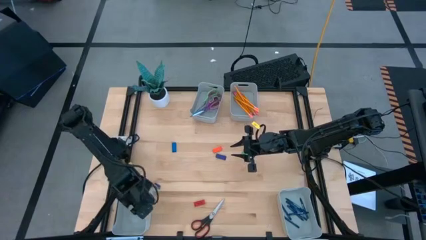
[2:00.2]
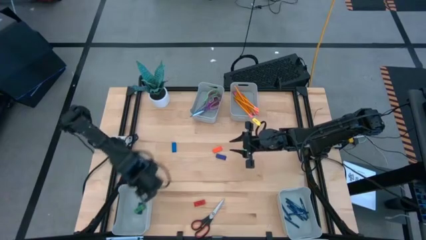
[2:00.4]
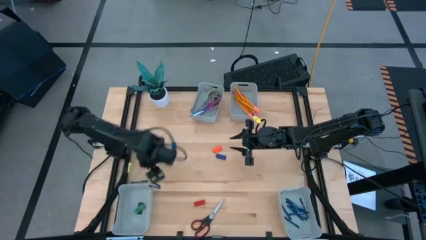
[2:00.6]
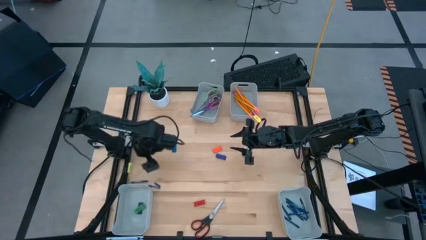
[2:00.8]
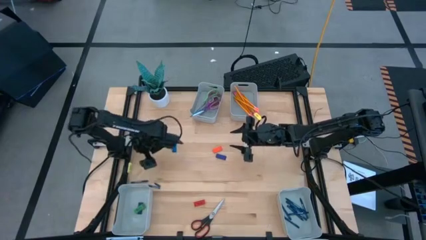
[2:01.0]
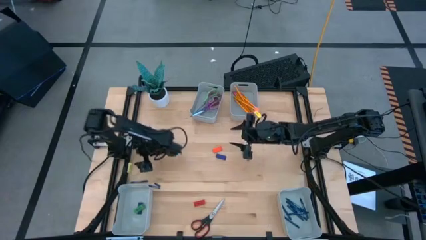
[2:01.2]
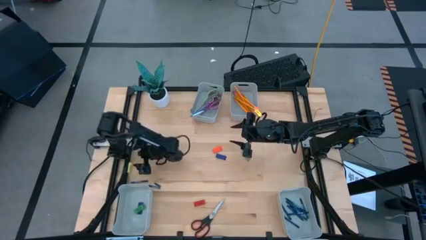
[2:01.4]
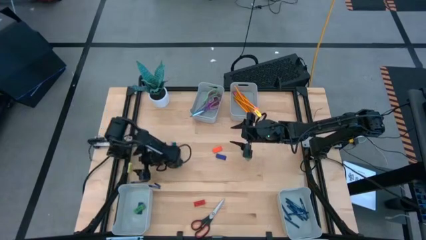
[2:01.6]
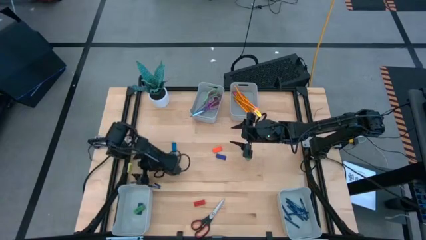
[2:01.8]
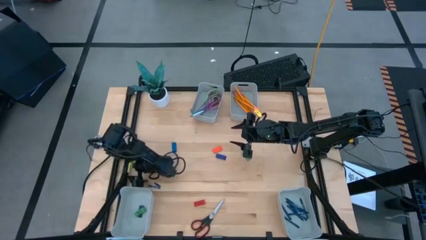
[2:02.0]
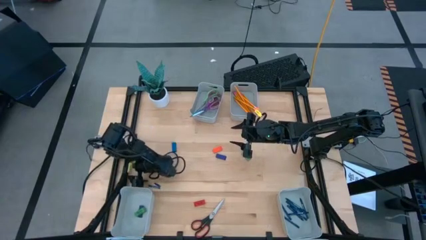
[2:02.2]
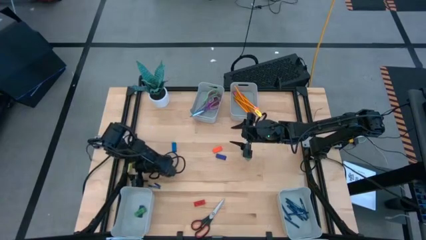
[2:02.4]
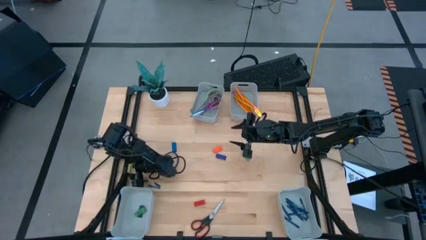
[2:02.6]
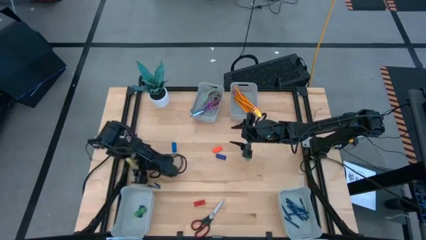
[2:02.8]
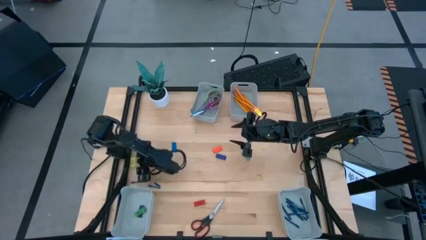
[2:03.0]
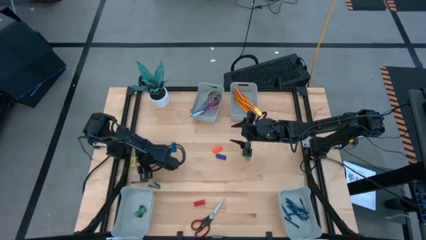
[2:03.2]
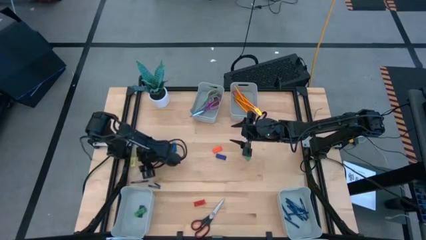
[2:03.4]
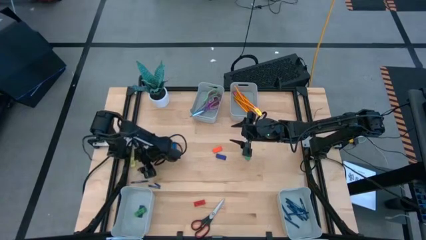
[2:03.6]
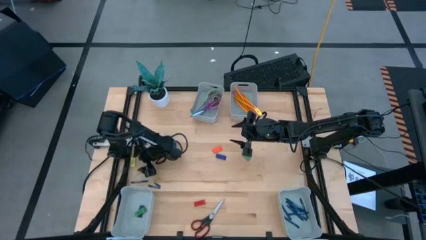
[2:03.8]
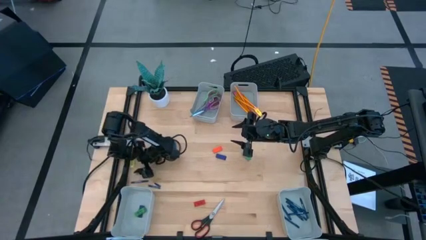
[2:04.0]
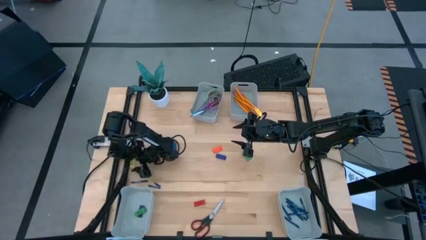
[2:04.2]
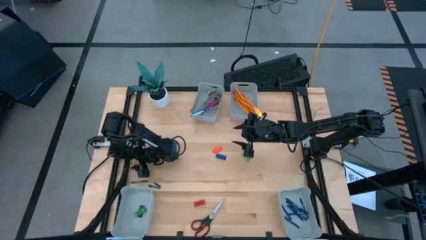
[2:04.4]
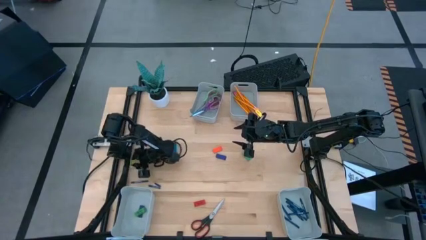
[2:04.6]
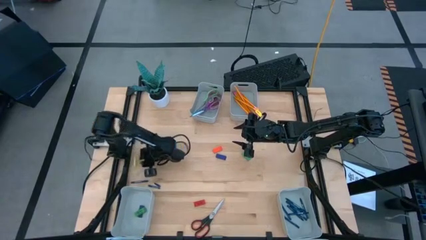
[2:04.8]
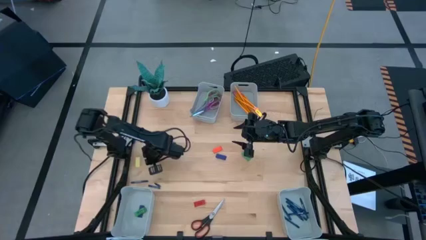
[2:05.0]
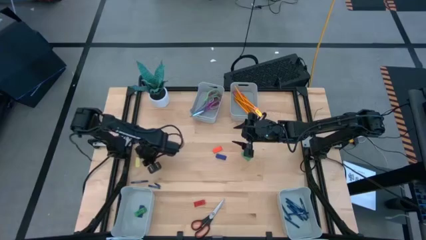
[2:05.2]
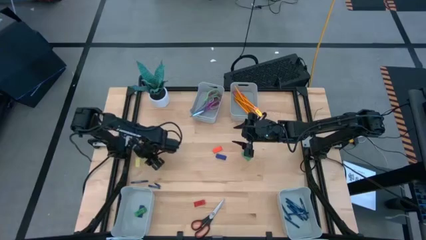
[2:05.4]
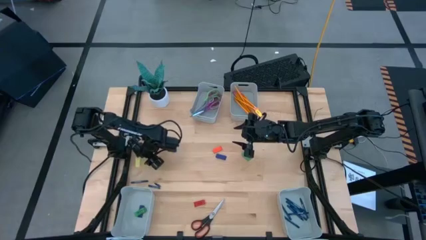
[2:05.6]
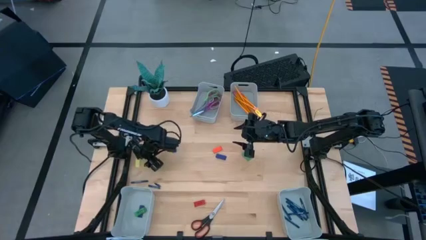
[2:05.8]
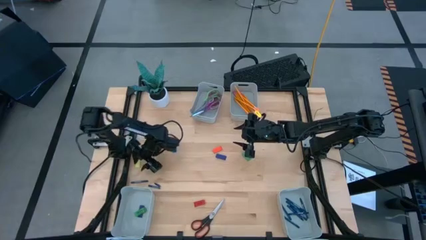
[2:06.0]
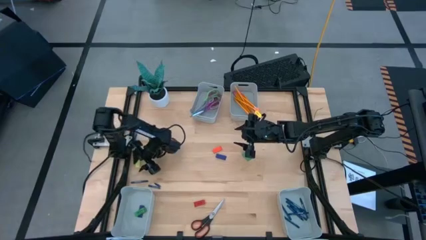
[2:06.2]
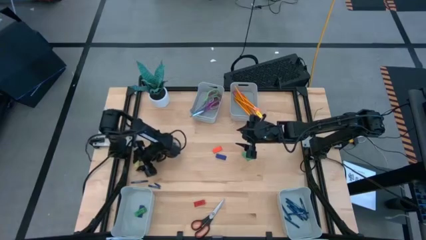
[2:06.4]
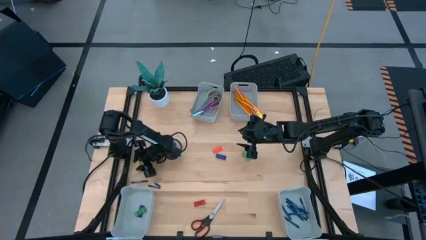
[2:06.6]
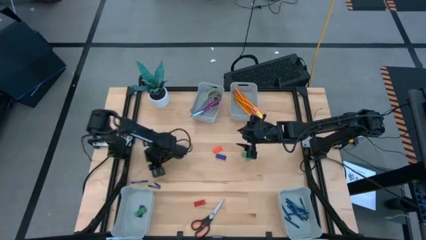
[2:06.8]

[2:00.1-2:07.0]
Task: Sort crayons/erasers/pens/pencils in bins
Prepare the yellow eraser

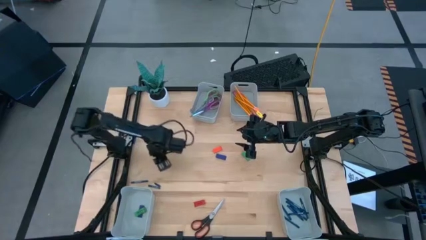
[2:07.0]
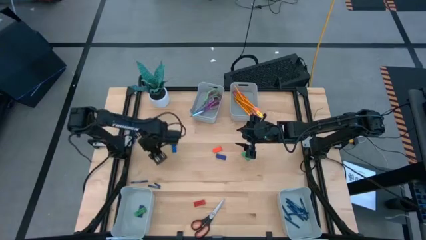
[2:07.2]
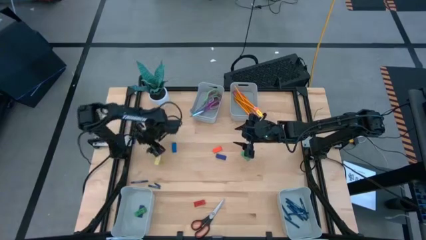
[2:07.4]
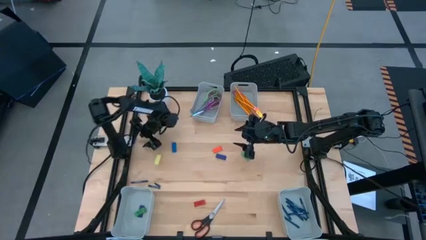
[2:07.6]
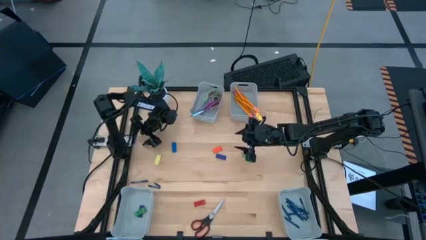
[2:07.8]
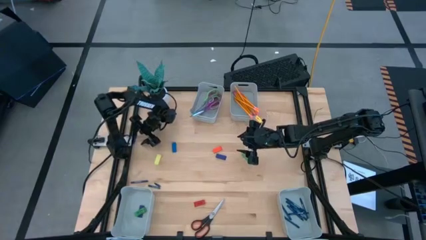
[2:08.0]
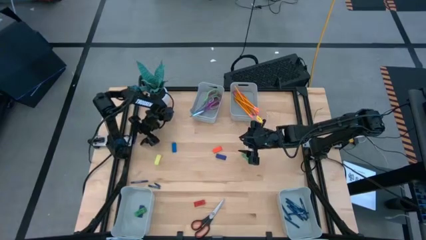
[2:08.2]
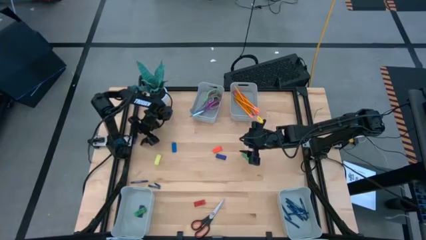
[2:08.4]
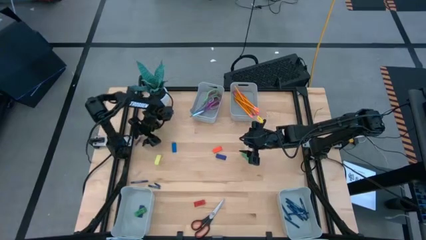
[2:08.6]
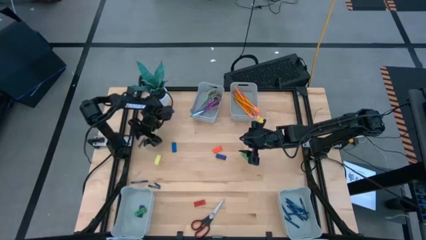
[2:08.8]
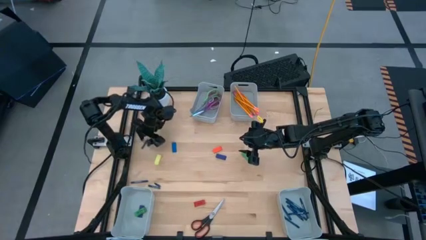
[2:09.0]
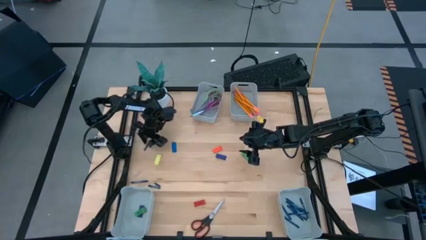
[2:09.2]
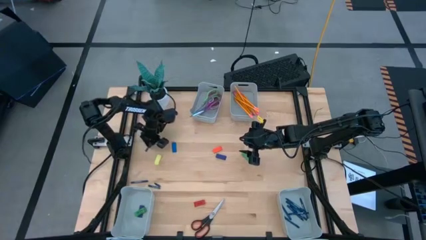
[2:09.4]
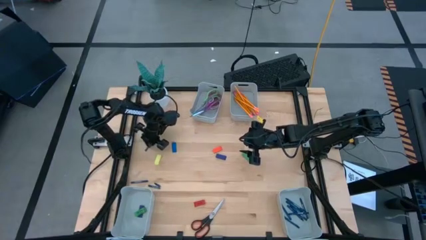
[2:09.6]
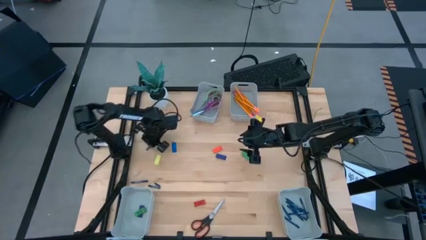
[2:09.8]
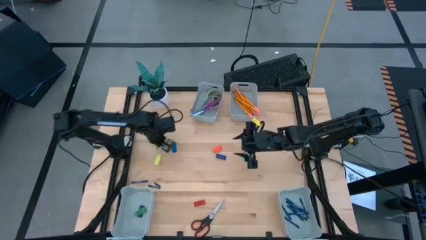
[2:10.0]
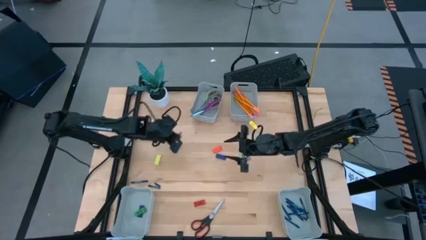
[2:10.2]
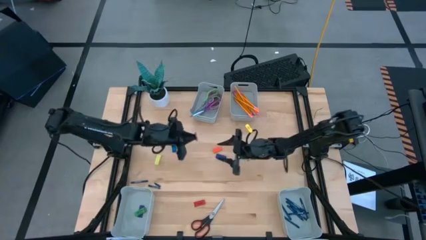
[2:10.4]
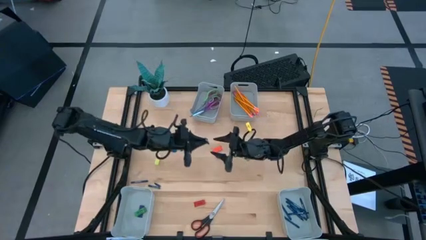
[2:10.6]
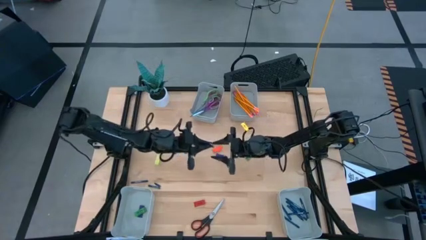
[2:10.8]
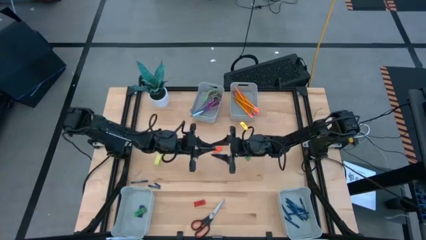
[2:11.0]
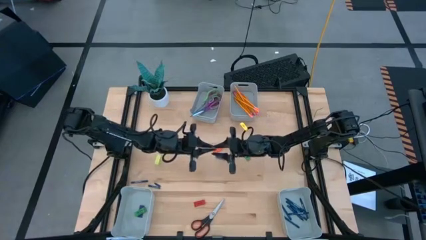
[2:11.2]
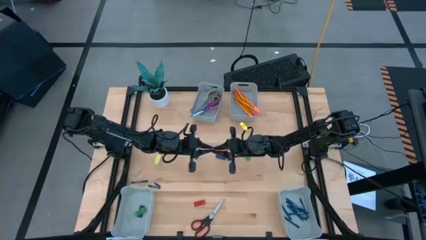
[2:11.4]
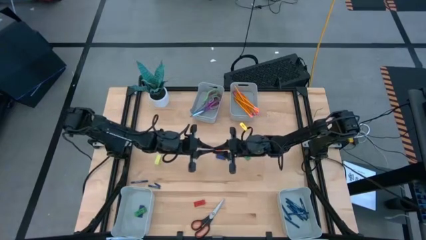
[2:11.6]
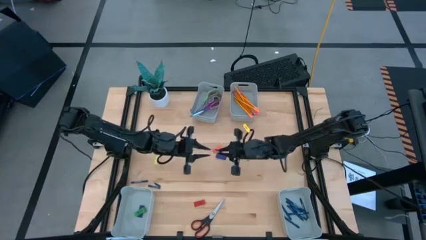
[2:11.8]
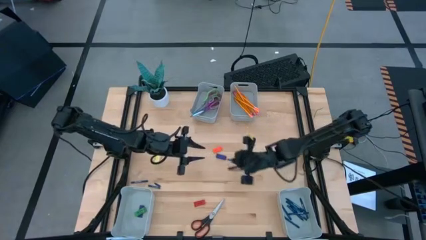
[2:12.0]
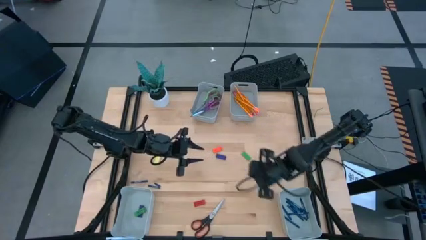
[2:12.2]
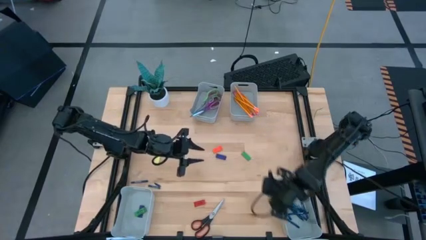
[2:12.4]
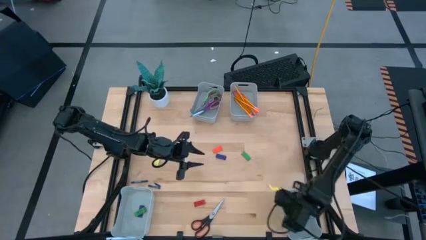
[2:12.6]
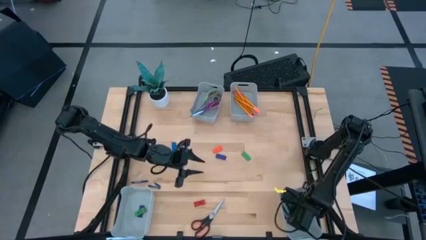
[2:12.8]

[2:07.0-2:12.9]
Put the blue crayon into the bottom right bin

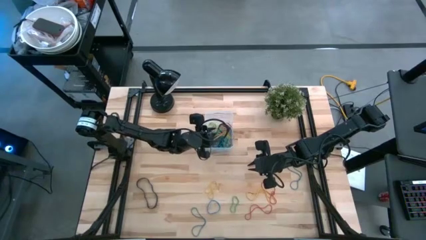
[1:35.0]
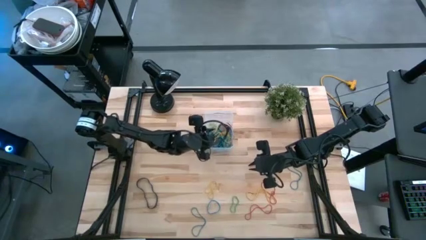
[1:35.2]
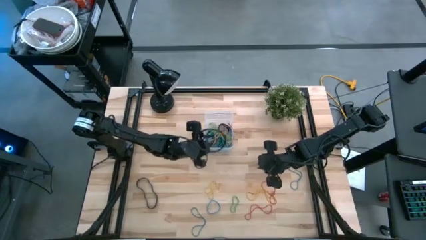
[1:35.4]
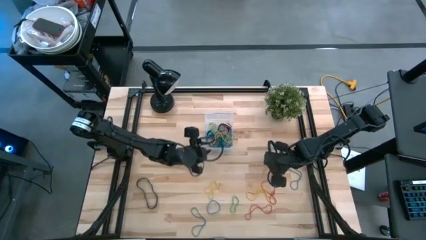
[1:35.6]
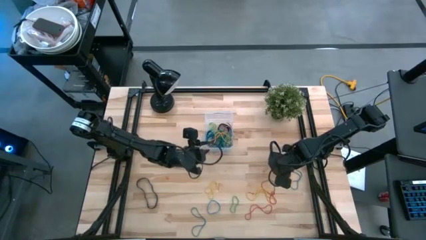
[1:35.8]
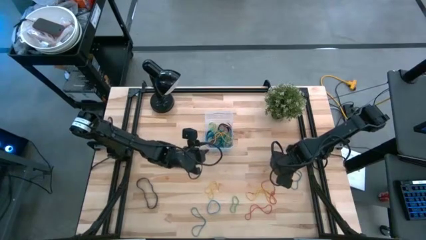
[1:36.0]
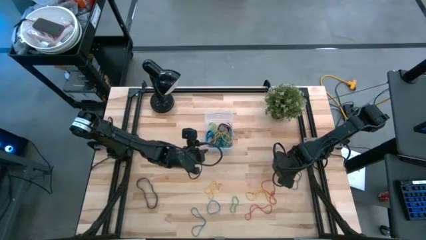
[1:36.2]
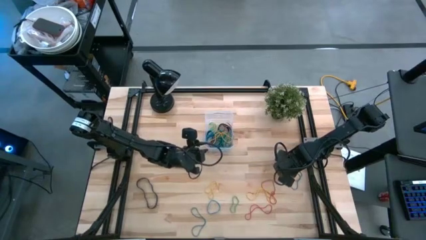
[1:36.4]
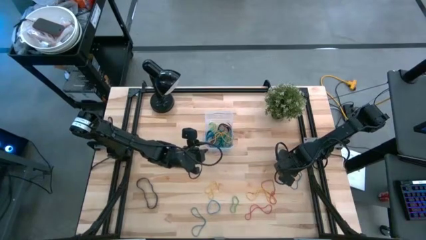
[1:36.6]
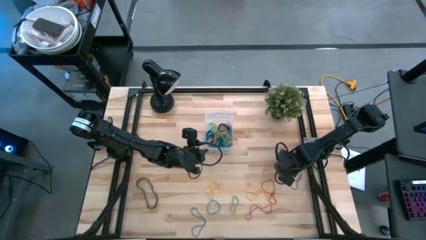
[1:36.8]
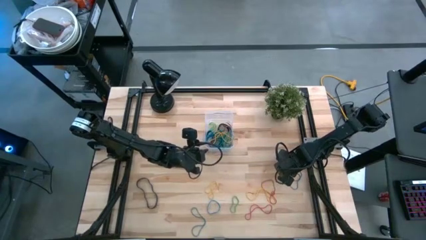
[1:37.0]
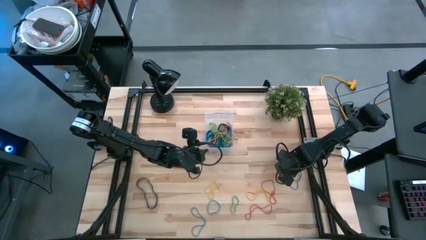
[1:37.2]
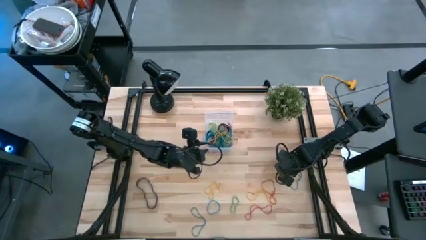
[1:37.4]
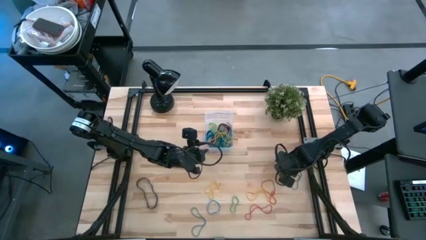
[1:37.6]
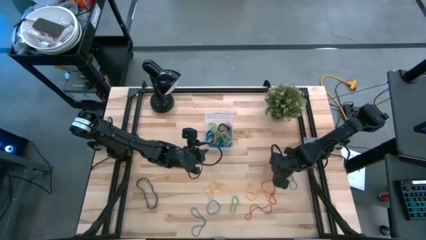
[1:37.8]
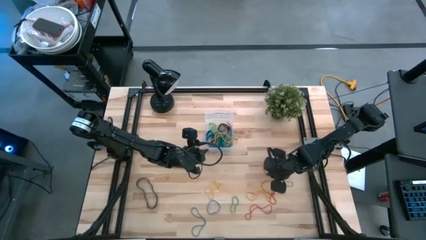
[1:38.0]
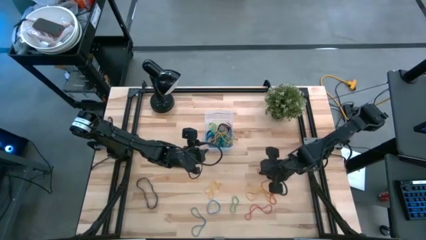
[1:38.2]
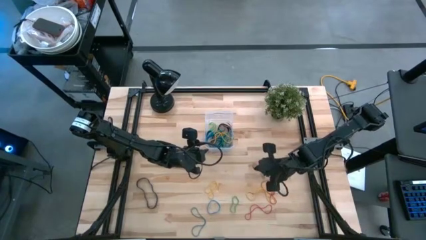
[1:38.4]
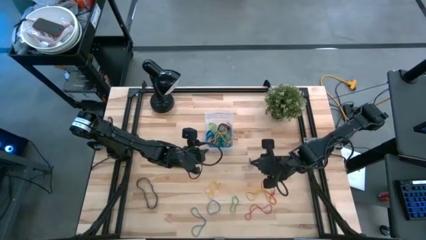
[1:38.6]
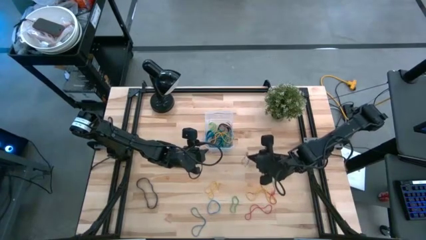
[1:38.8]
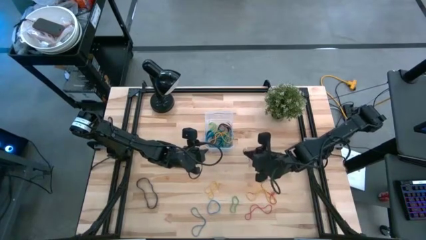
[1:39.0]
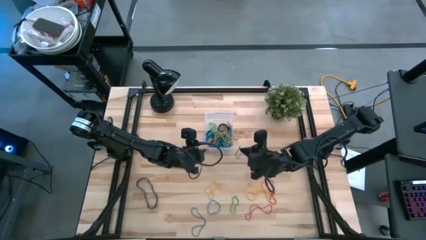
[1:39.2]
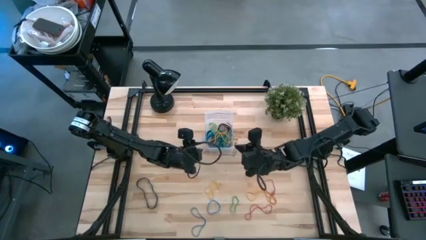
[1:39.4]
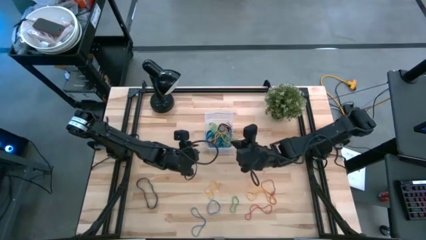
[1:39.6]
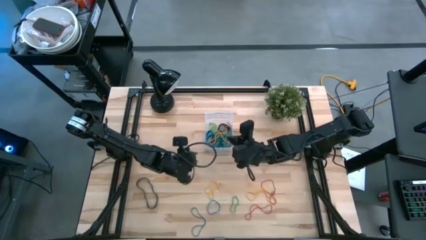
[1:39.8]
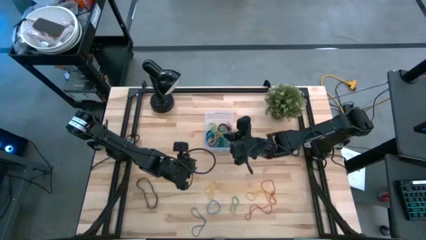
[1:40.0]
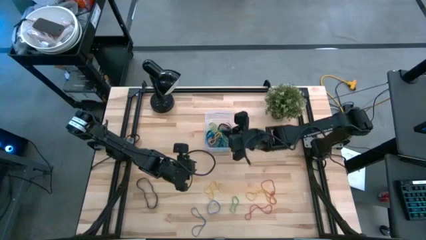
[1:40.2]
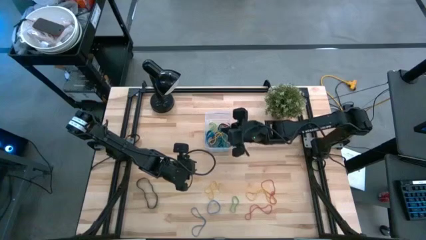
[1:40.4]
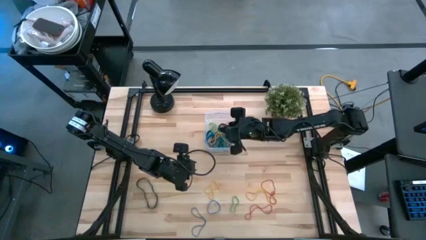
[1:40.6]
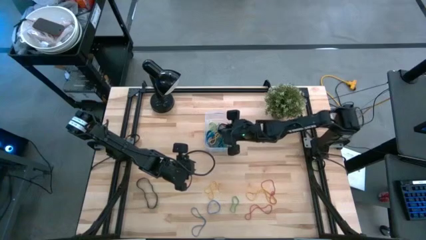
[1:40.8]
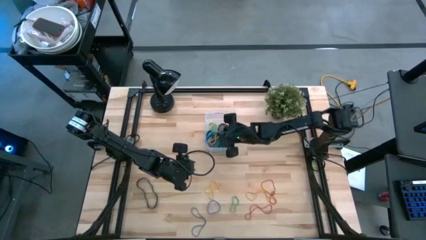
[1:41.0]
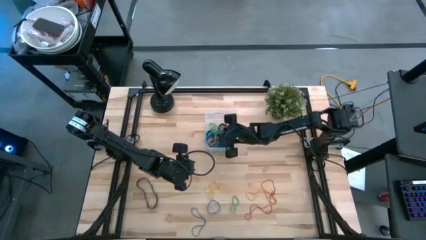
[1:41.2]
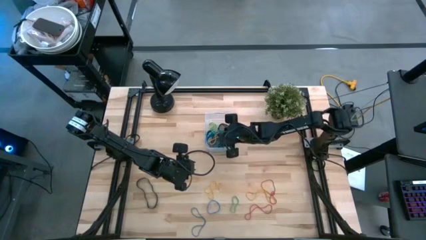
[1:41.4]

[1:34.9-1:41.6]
Task: Pick and place rubber bands into bin
Put blue rubberband into the transparent bin
